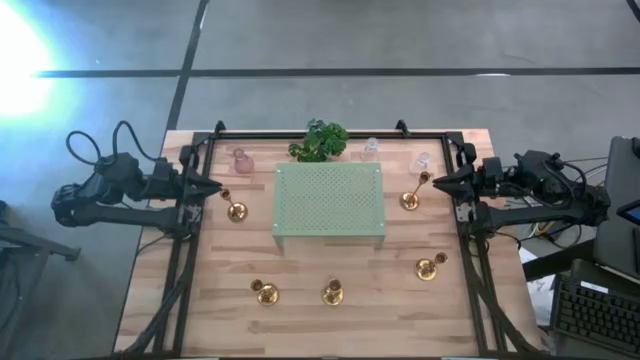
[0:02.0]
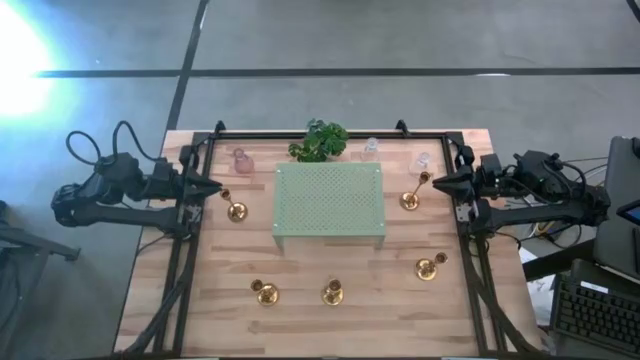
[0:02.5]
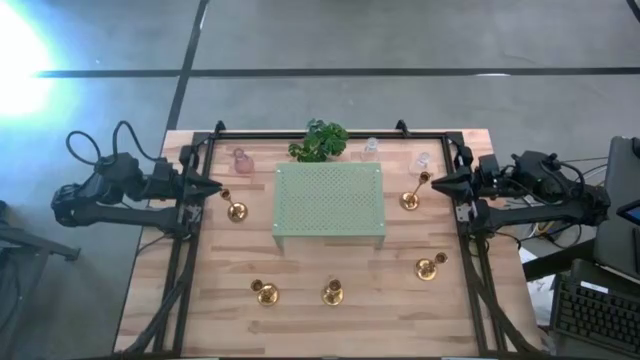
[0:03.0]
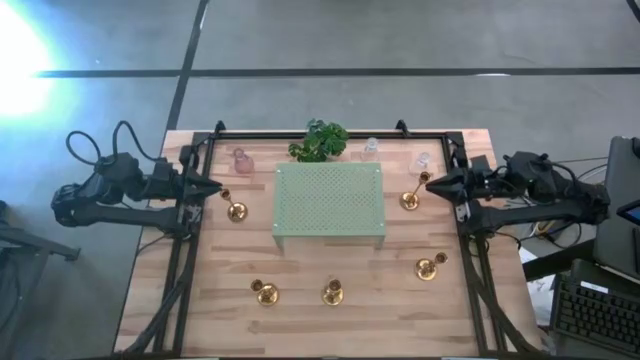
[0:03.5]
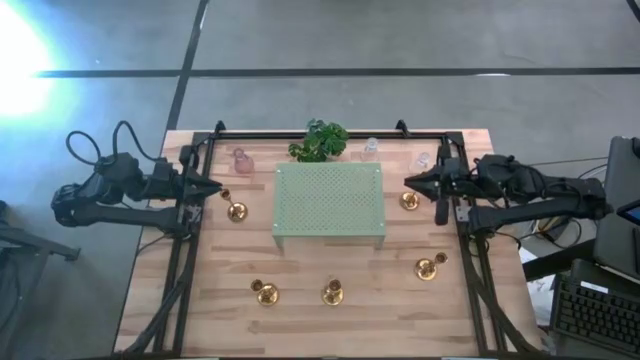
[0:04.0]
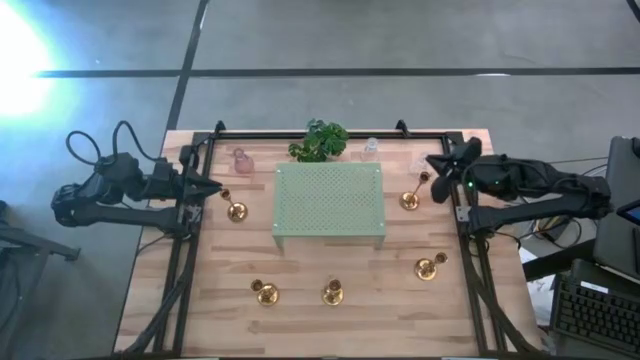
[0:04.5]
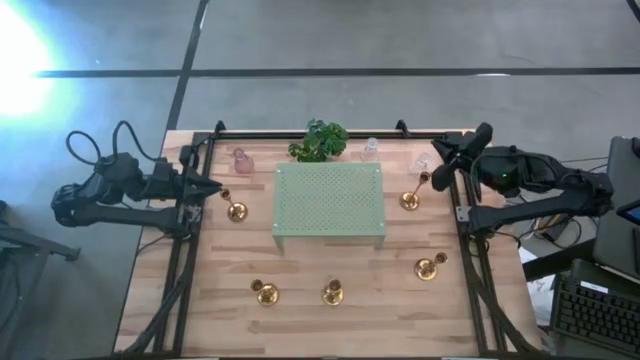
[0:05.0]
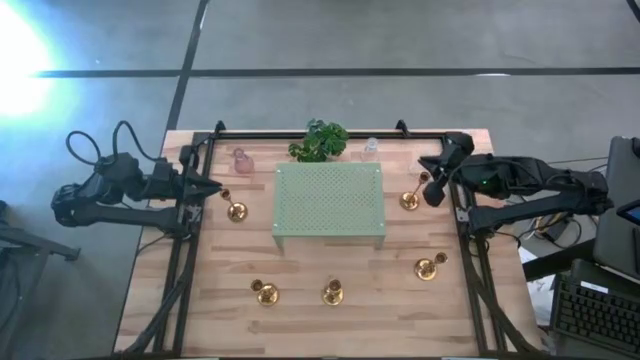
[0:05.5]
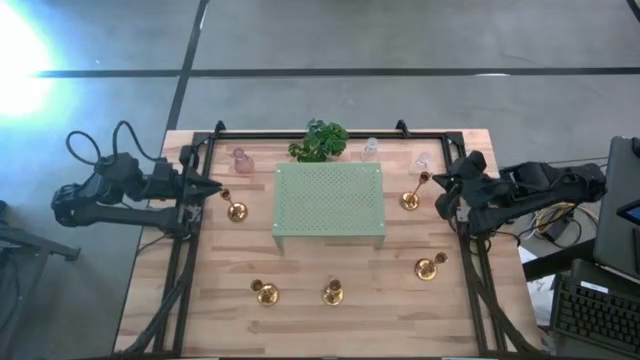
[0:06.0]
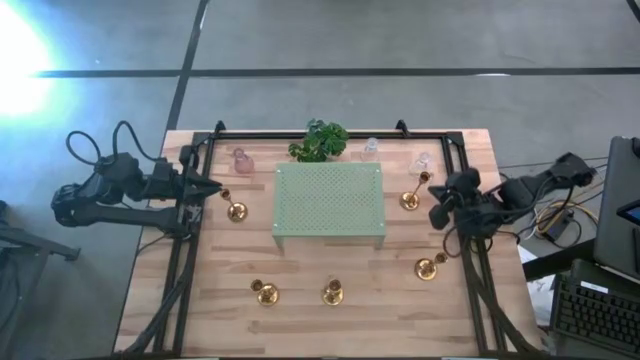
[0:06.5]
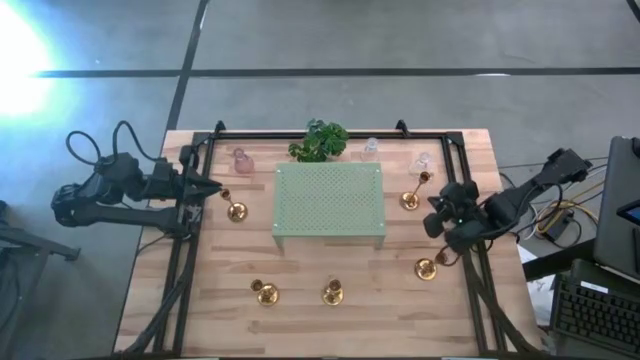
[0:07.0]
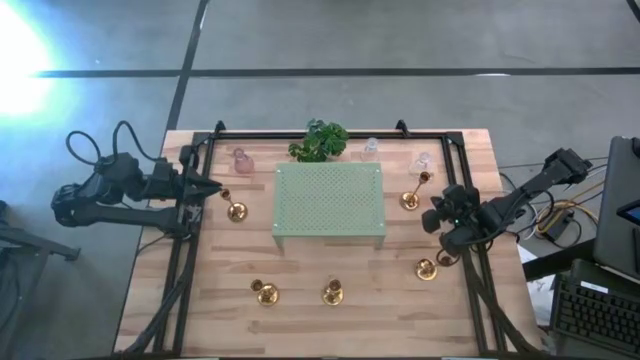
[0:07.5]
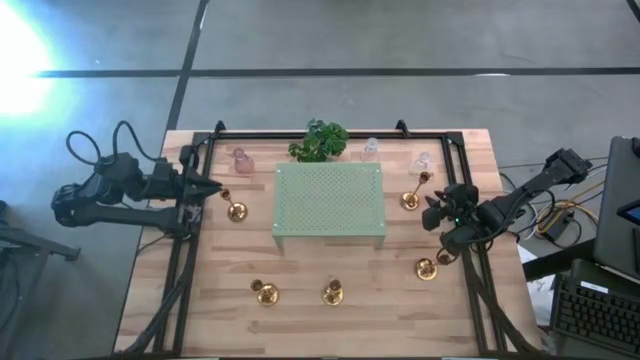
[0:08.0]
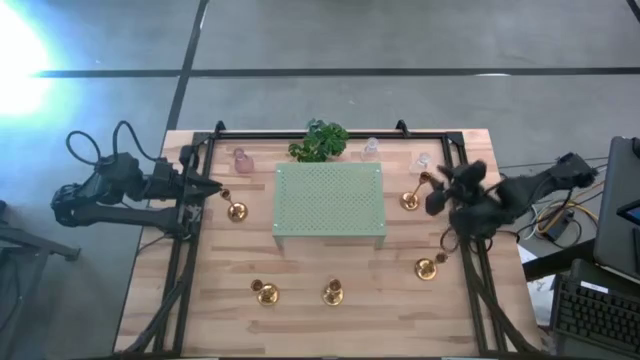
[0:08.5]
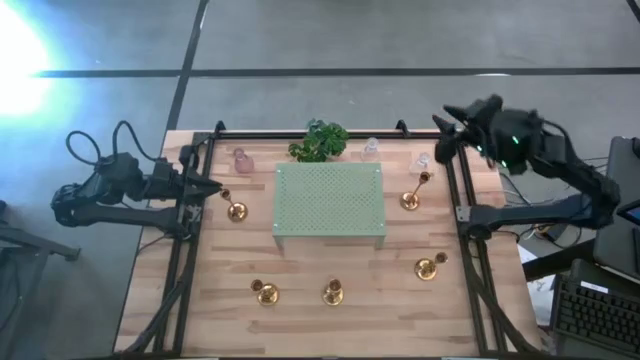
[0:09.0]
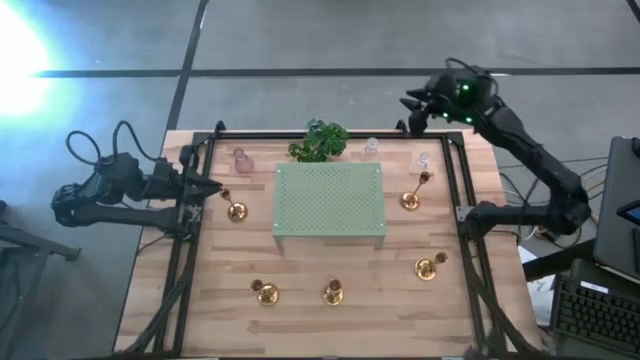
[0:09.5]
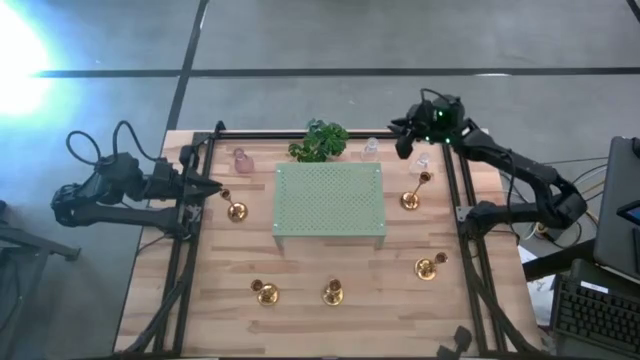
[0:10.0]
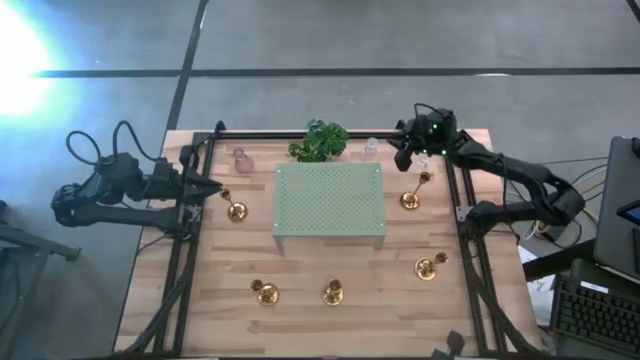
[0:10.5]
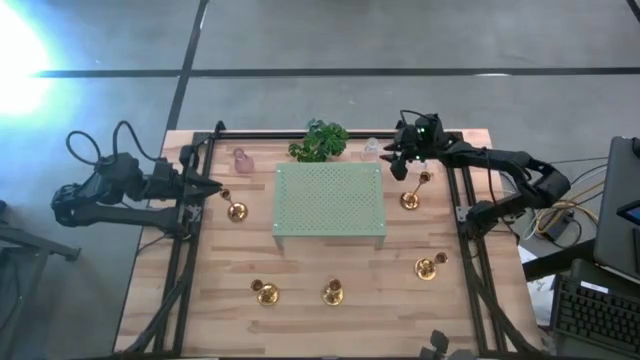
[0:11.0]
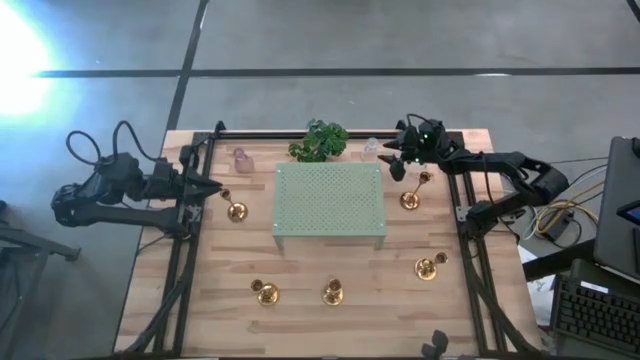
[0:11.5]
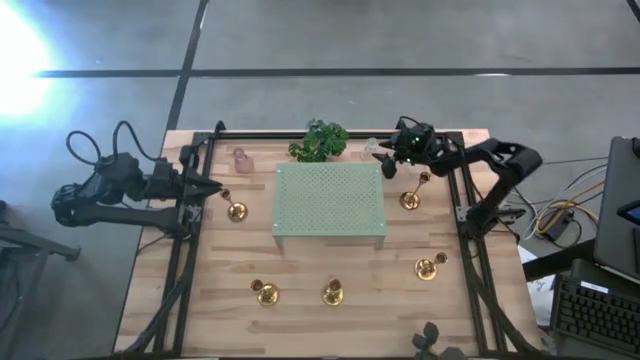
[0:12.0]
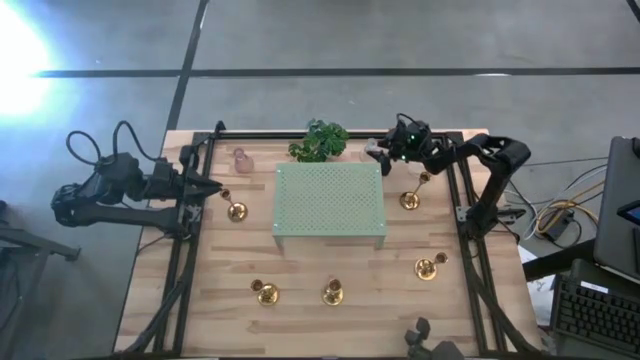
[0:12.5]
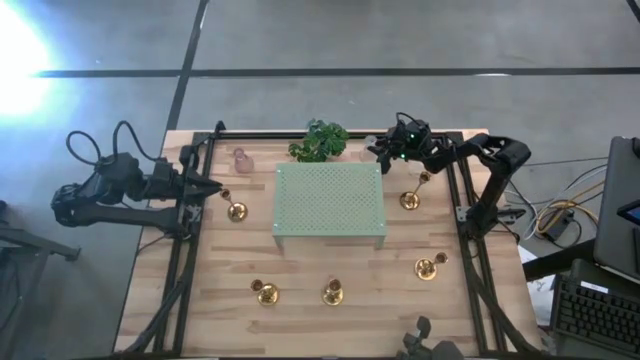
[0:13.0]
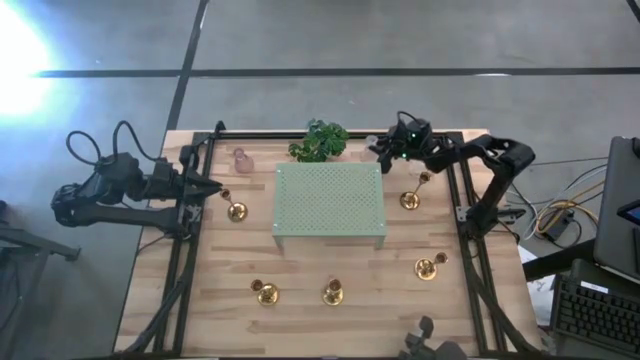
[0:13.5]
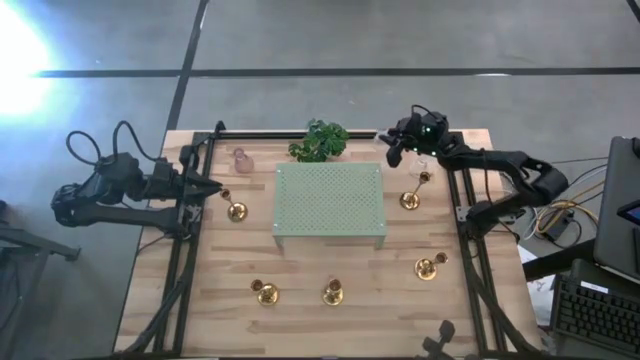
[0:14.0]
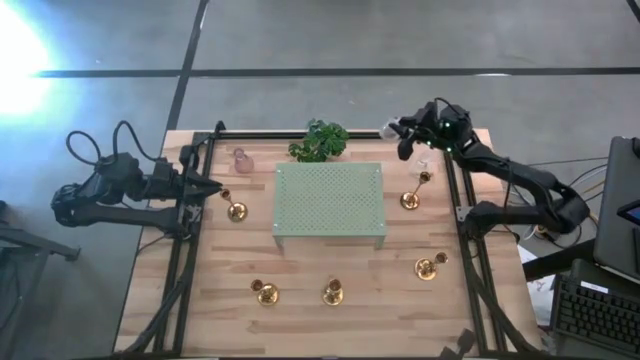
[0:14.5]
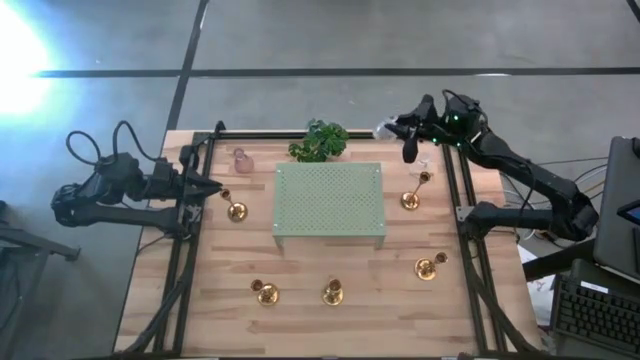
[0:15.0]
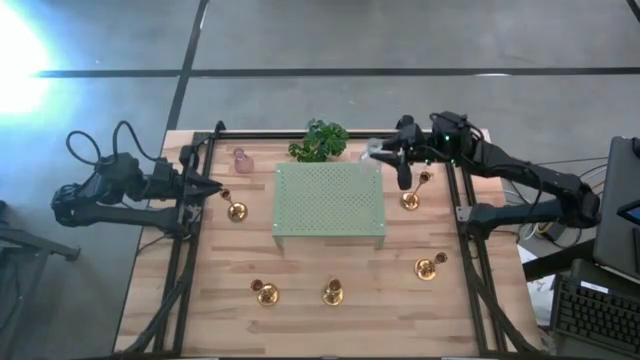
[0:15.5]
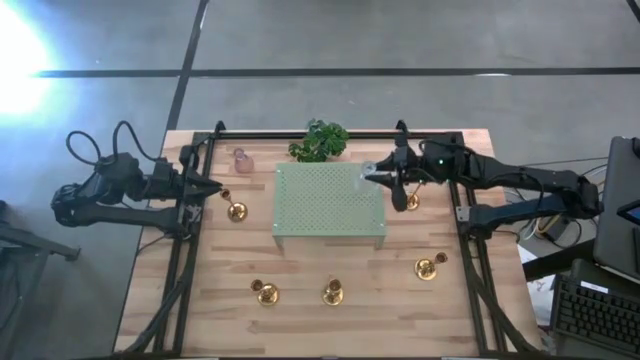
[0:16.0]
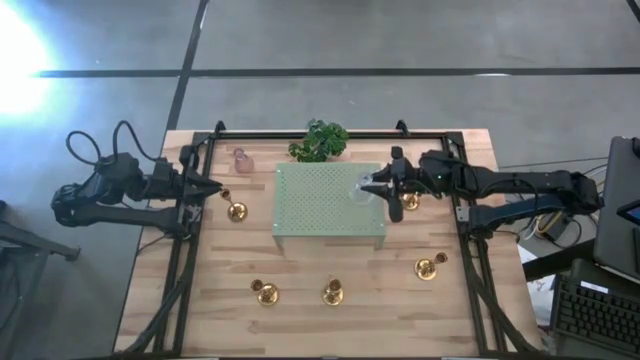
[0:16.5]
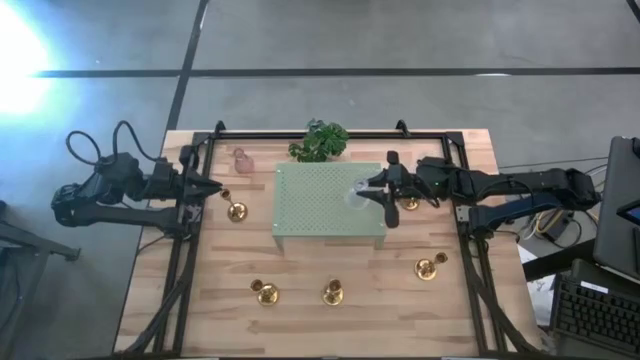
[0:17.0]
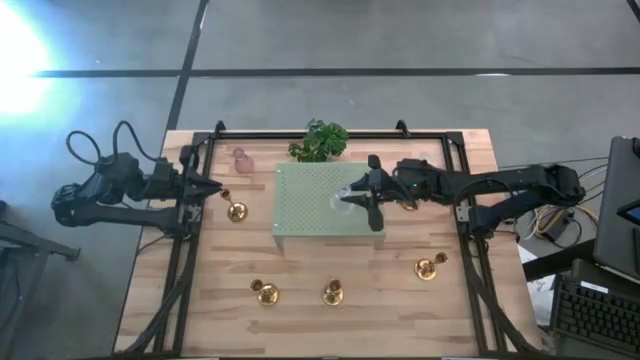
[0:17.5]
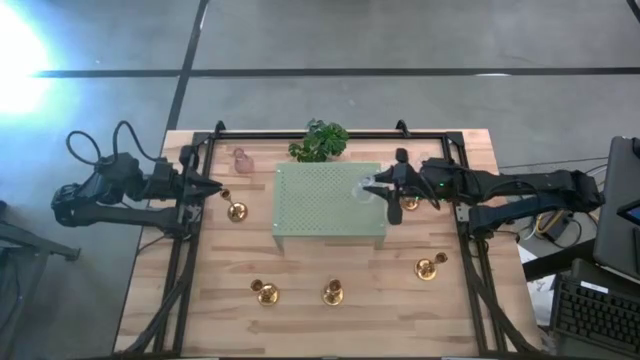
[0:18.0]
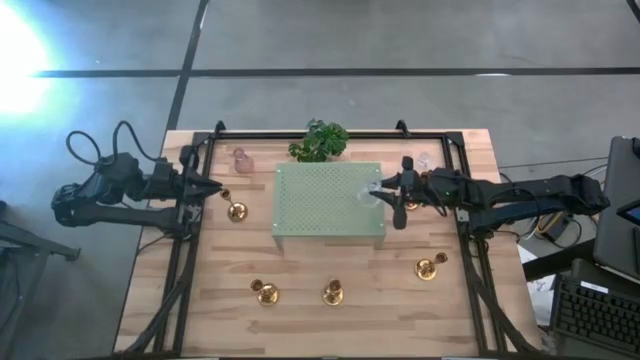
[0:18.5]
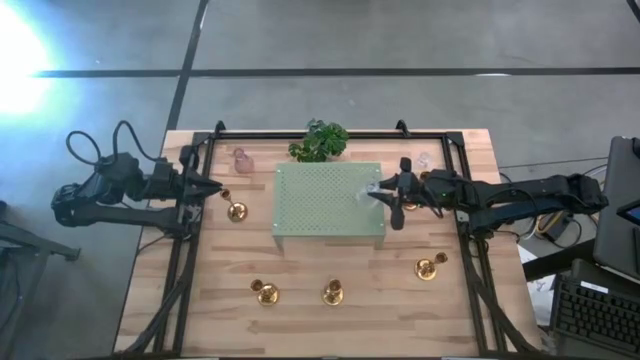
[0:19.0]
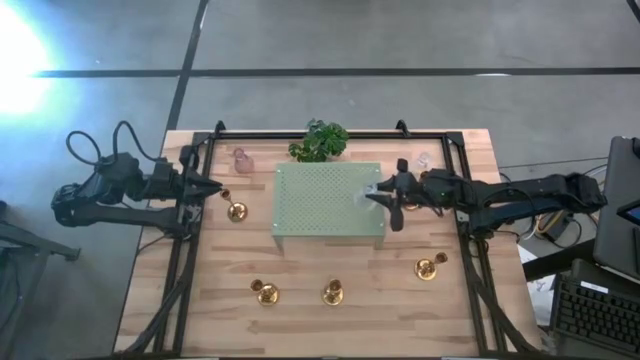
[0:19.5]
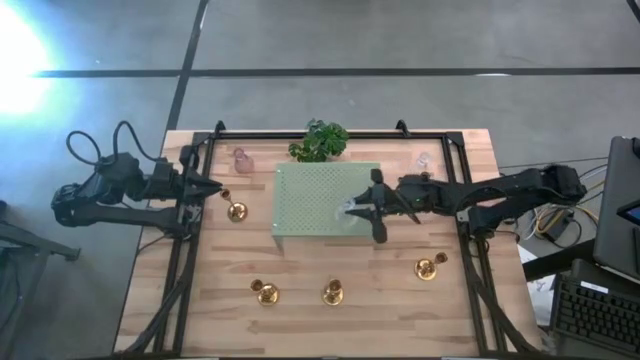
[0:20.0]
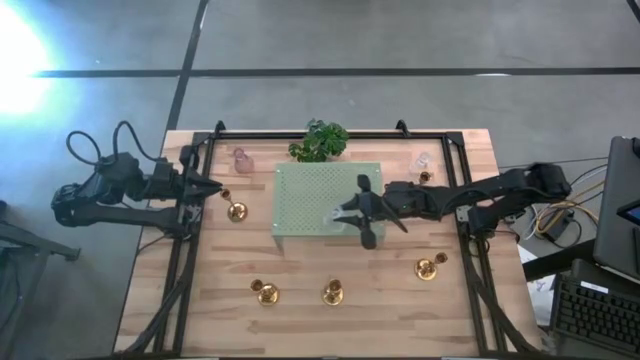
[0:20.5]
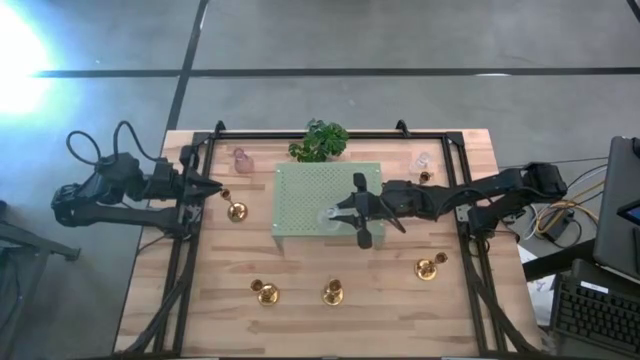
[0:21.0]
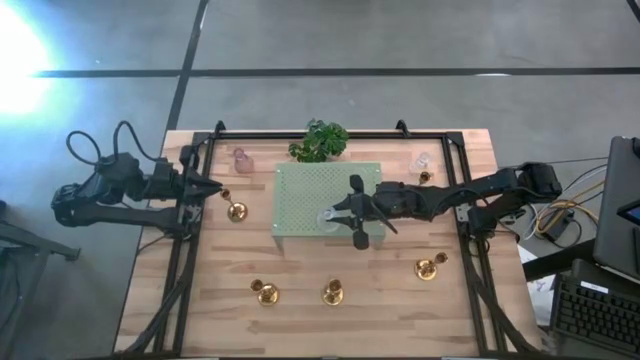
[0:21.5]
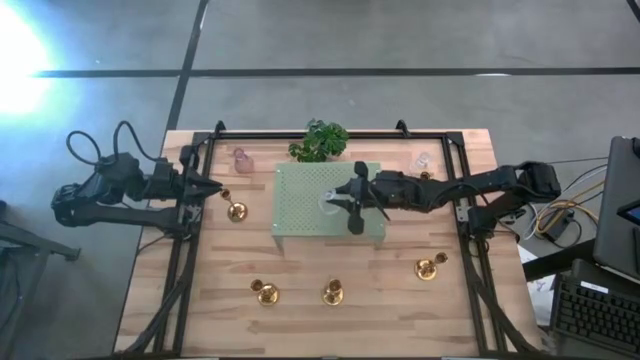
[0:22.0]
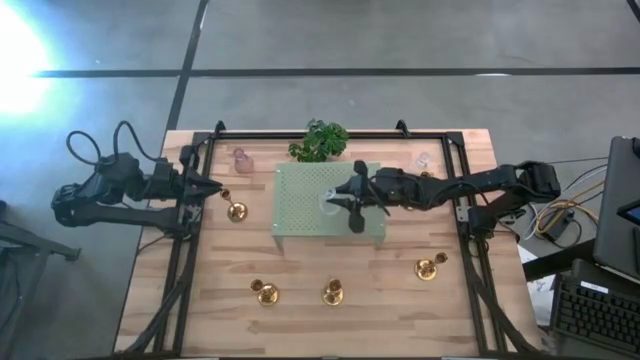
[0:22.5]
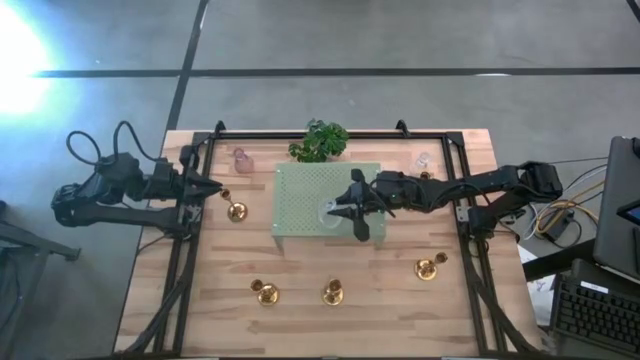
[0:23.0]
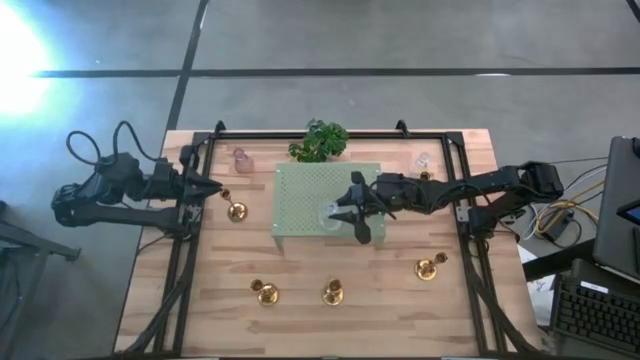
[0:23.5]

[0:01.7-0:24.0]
Task: Pick & Place candle stick holders
Put the transparent candle holder on the shelf
